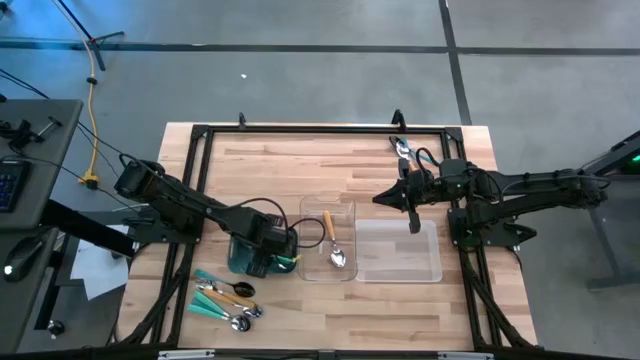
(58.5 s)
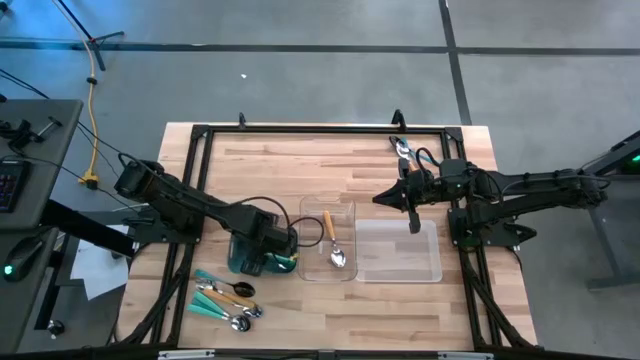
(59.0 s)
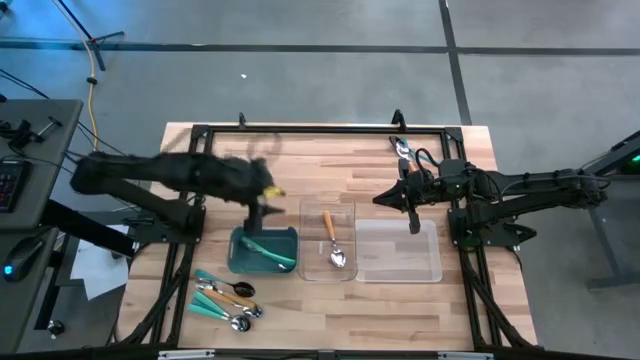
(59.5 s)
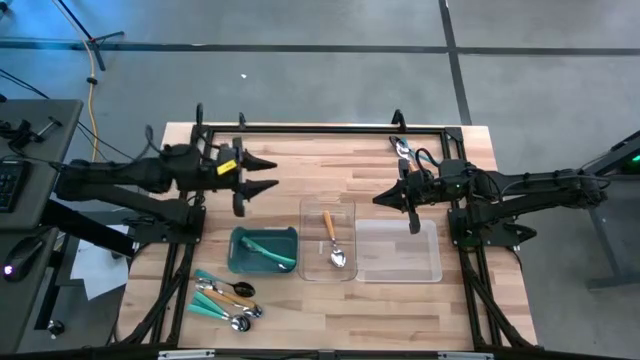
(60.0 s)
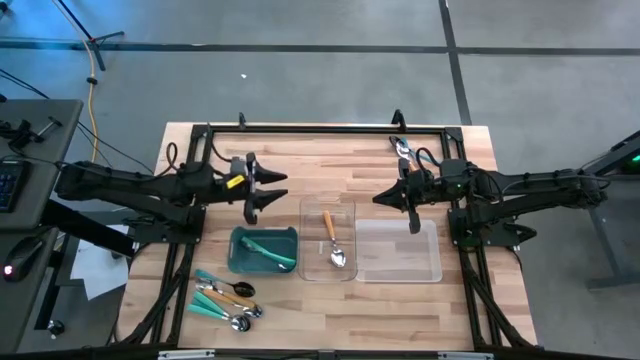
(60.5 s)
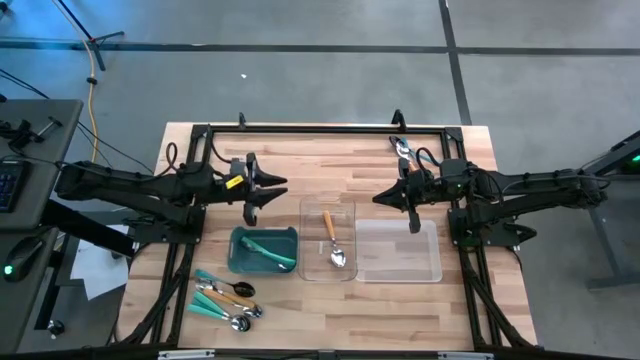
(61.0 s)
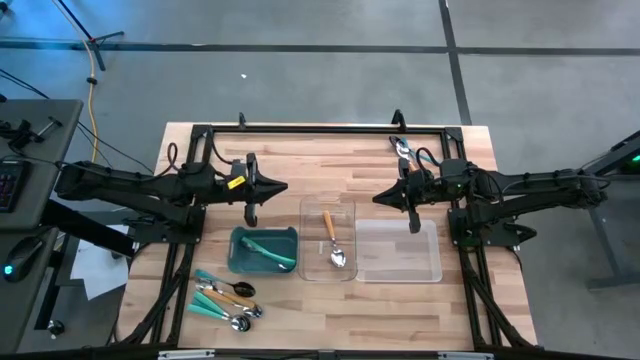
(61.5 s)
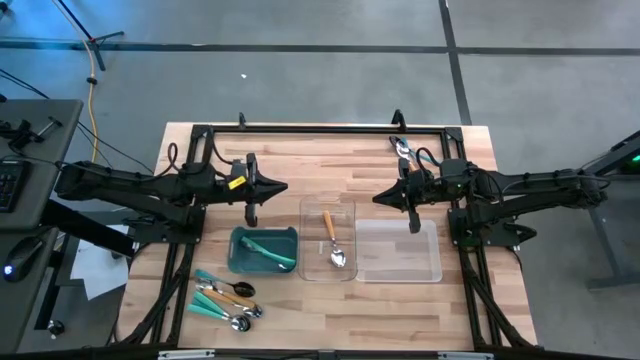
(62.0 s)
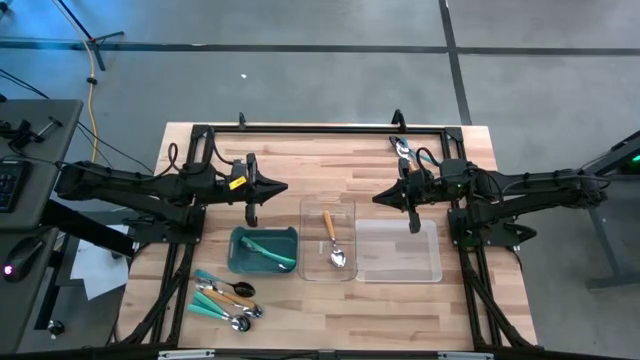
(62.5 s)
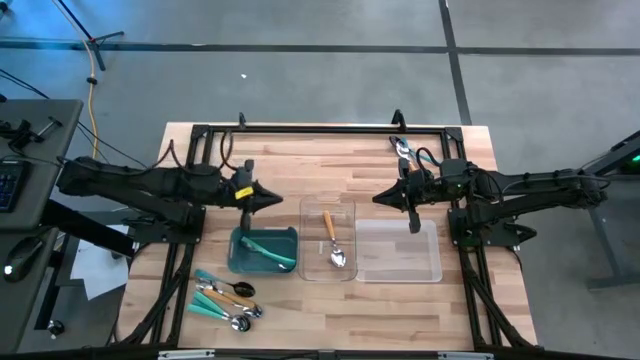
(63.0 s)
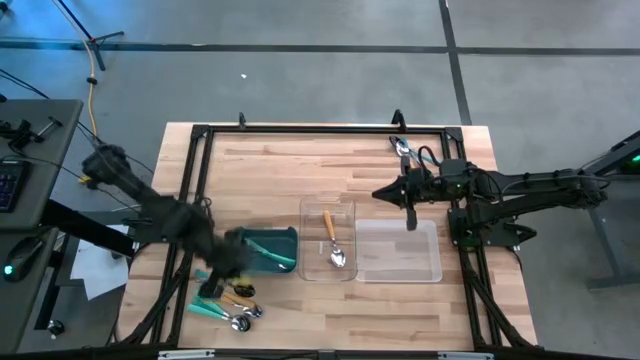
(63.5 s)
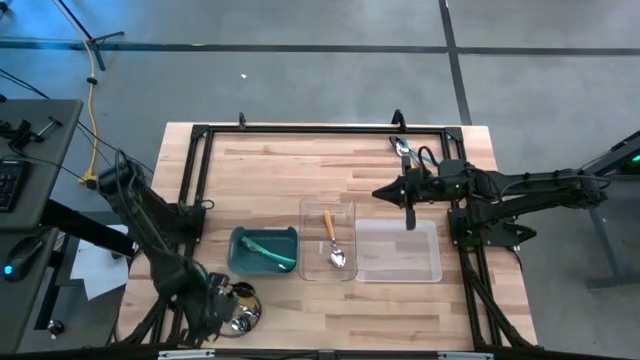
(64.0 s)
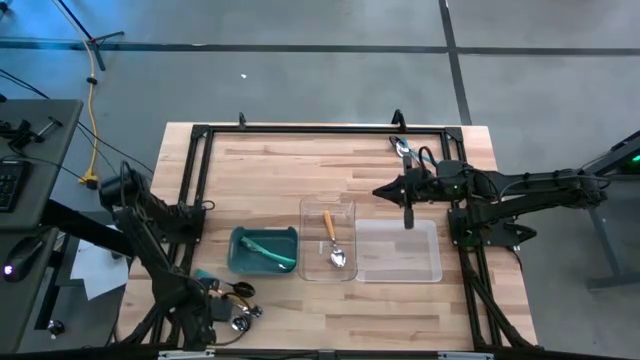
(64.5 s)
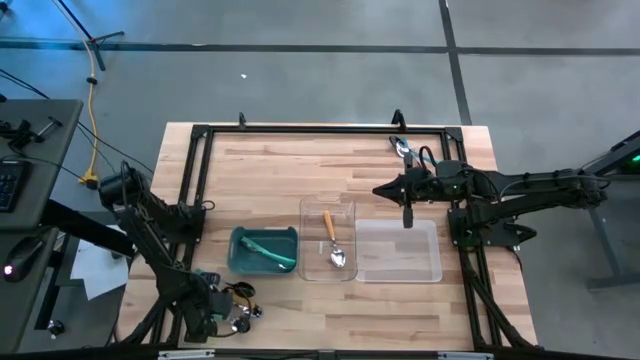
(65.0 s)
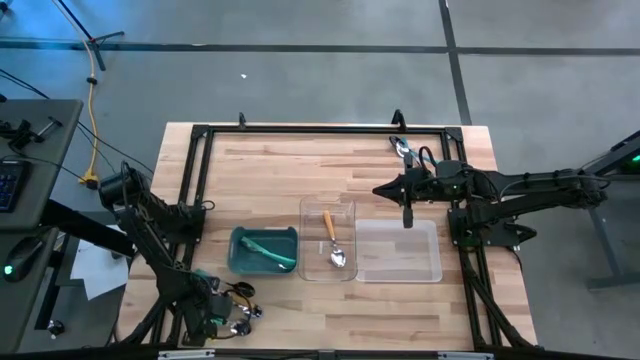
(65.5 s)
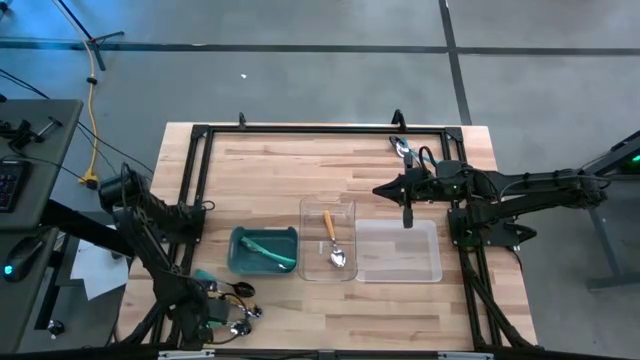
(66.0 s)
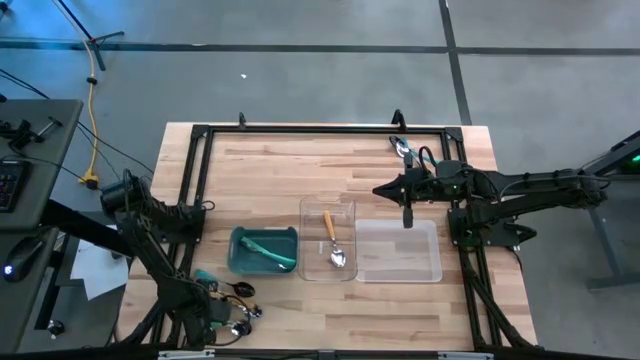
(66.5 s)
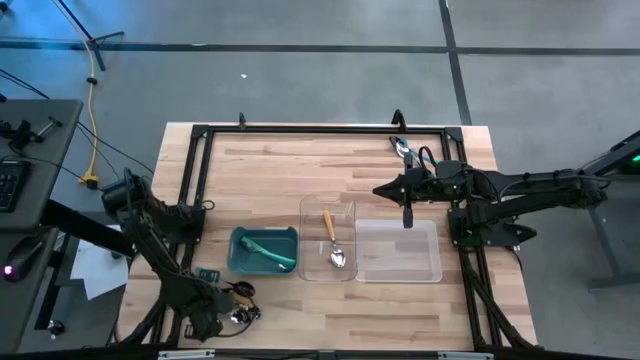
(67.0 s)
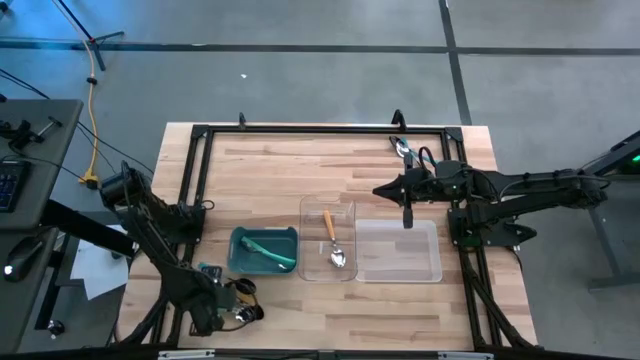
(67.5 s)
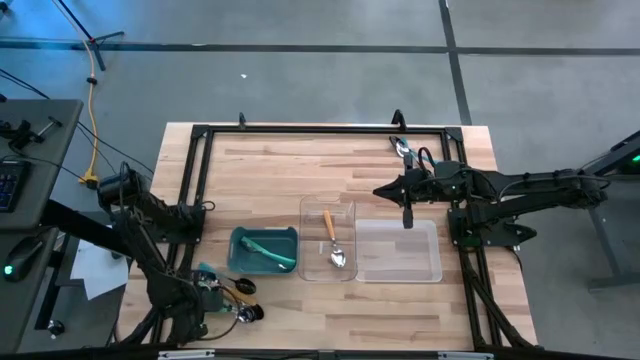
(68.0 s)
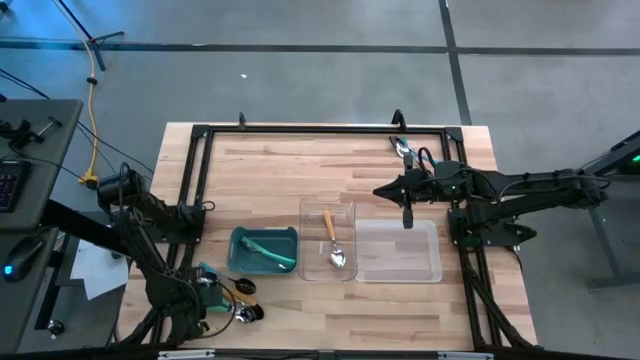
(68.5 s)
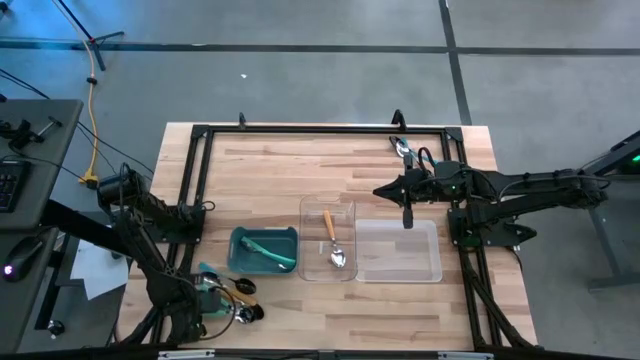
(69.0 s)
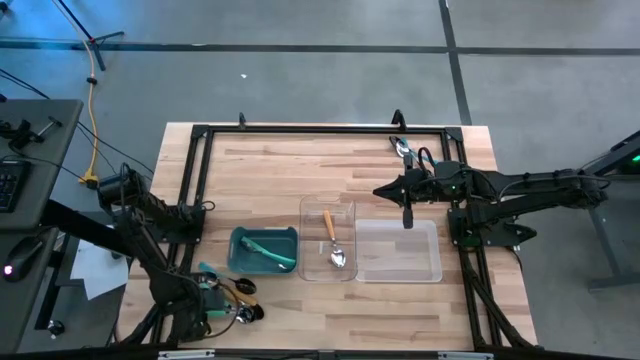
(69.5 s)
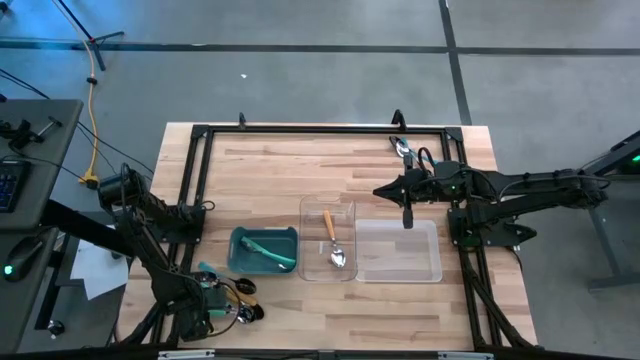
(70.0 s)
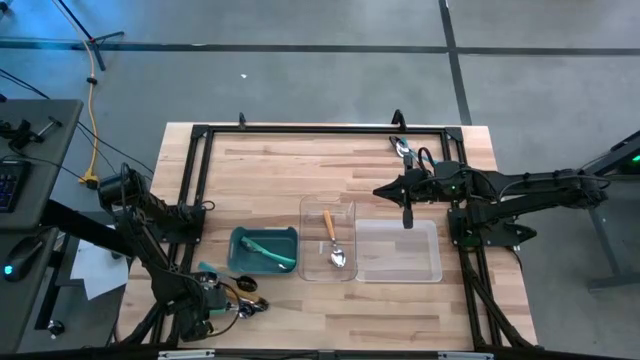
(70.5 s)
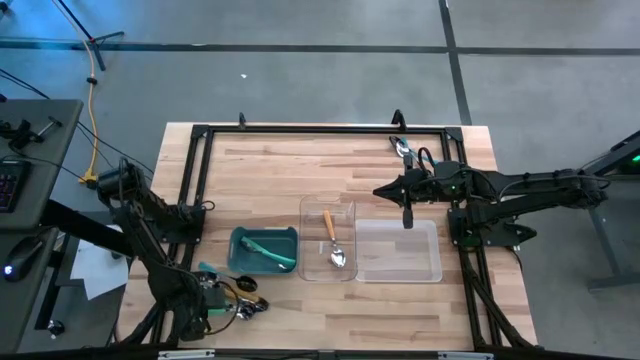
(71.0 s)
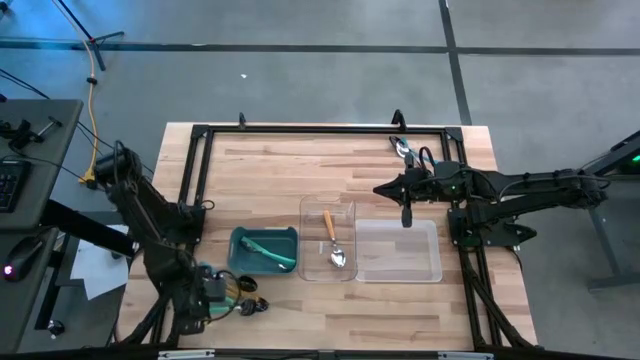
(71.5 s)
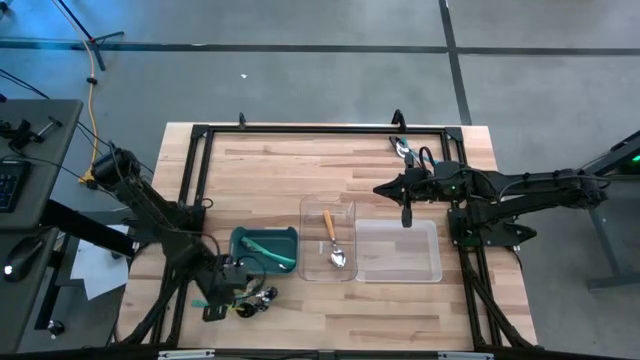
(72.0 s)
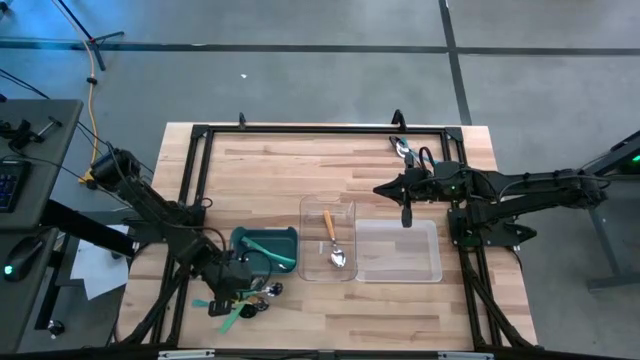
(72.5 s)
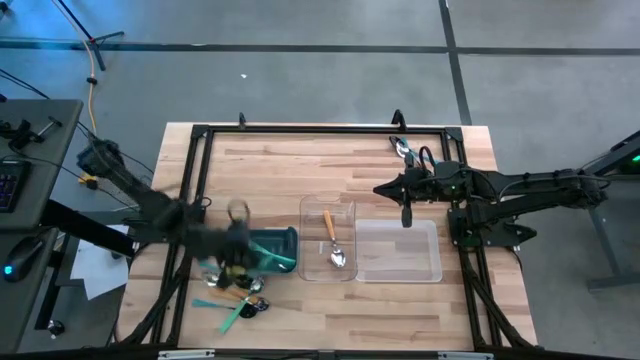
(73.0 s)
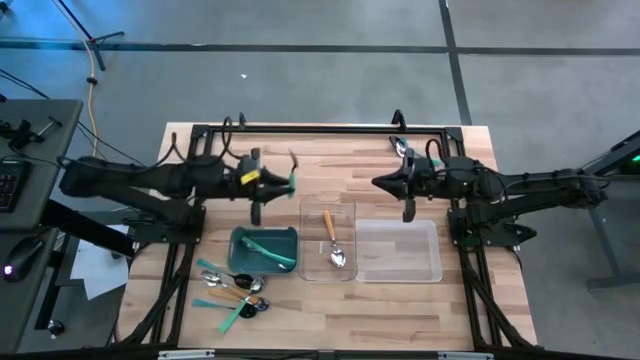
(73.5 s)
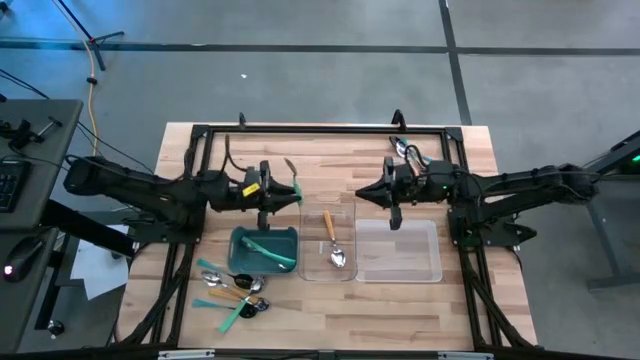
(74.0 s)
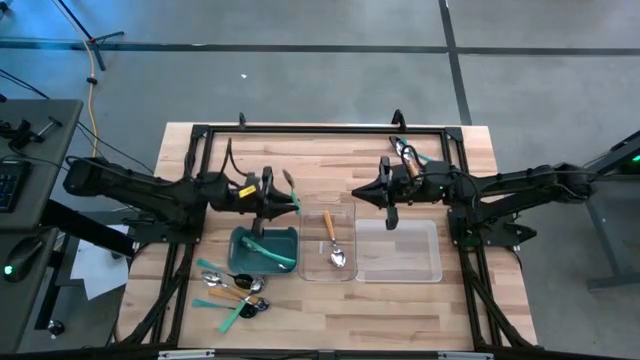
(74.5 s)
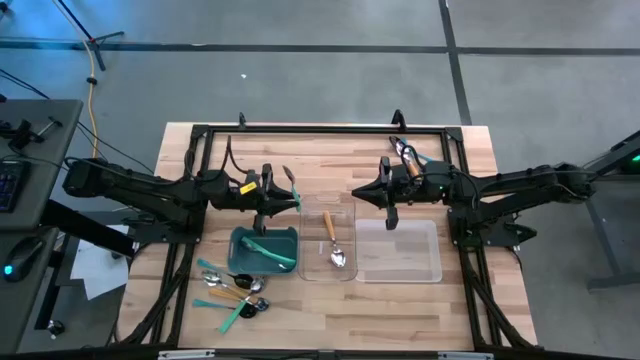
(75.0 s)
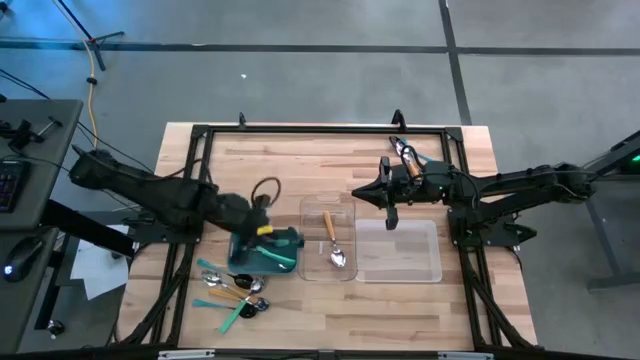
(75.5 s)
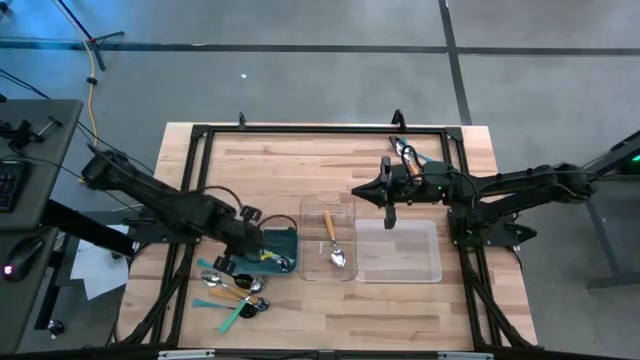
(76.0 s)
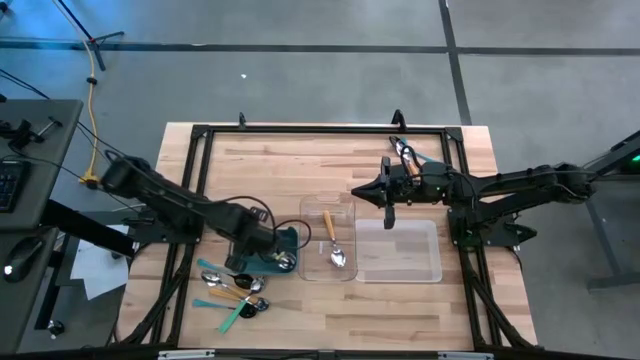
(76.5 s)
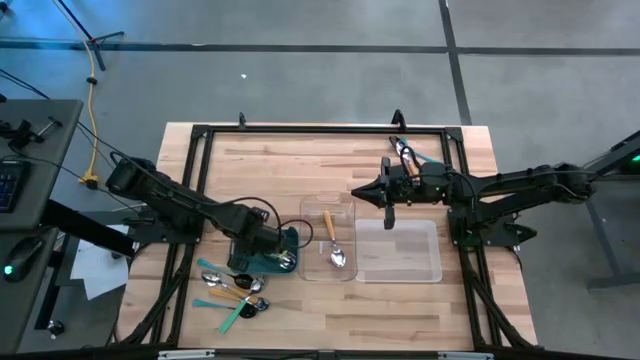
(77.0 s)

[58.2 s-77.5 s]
Task: Sort silverware by color (type)
Put the light blue spoon into the blue bin
